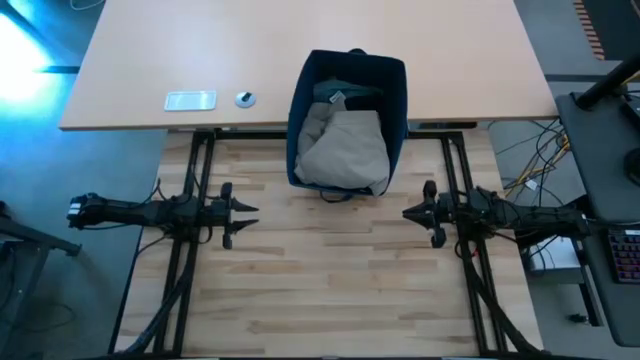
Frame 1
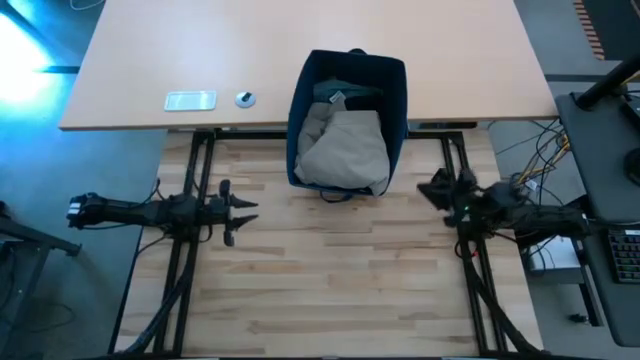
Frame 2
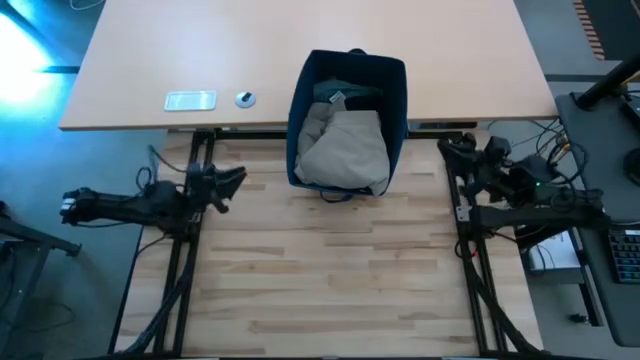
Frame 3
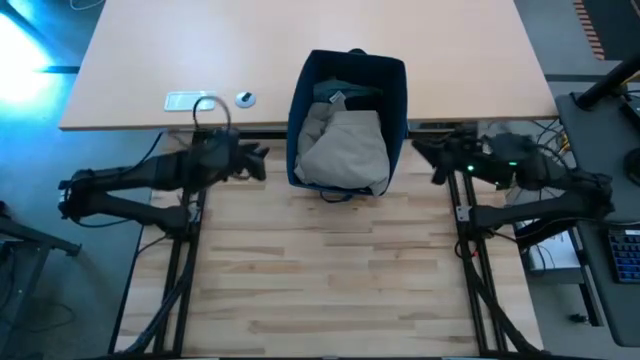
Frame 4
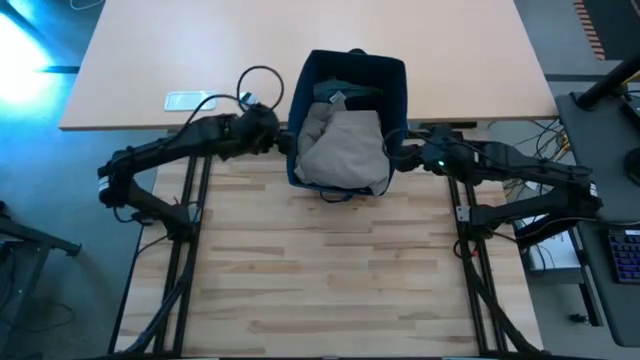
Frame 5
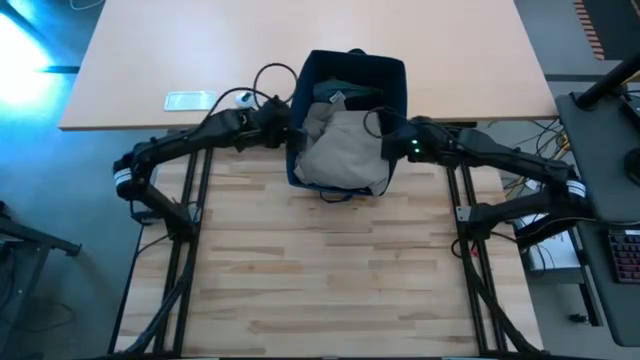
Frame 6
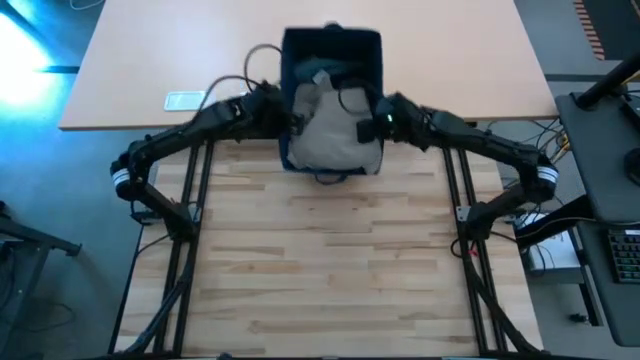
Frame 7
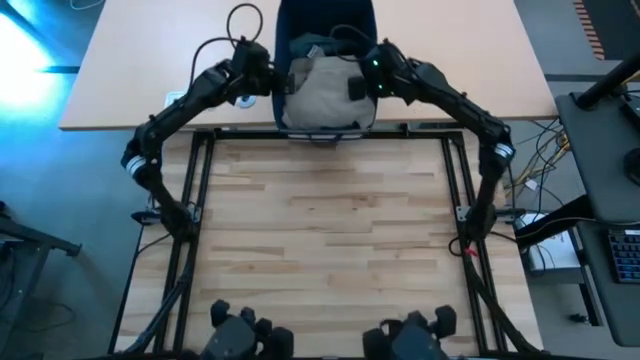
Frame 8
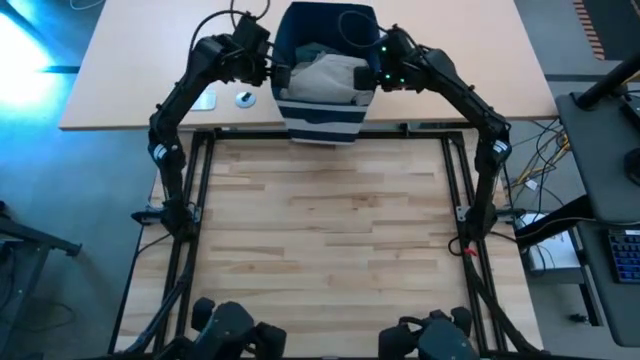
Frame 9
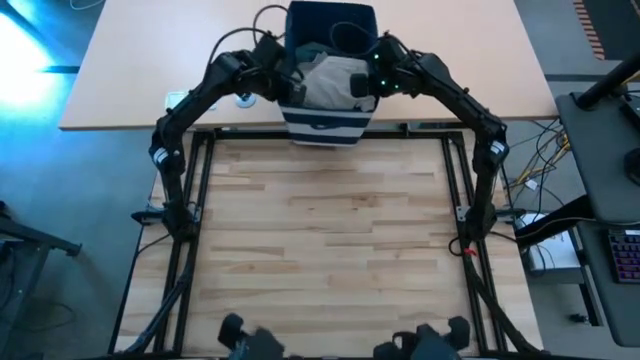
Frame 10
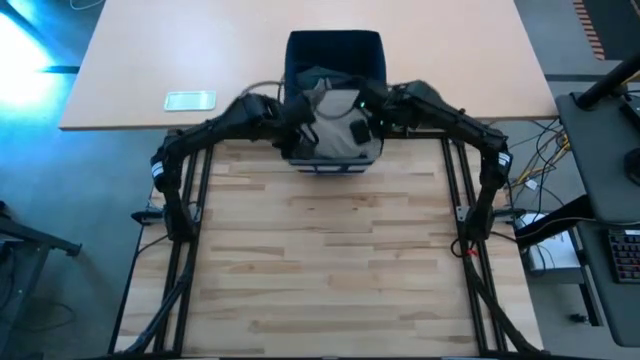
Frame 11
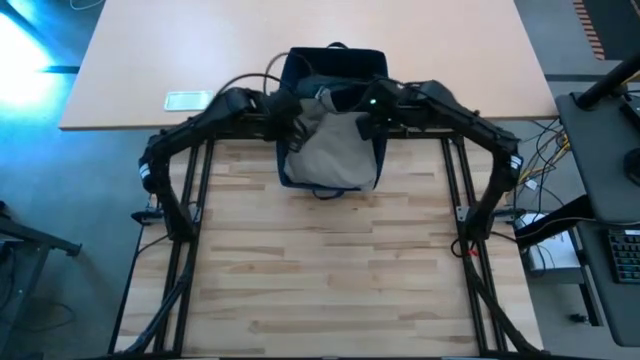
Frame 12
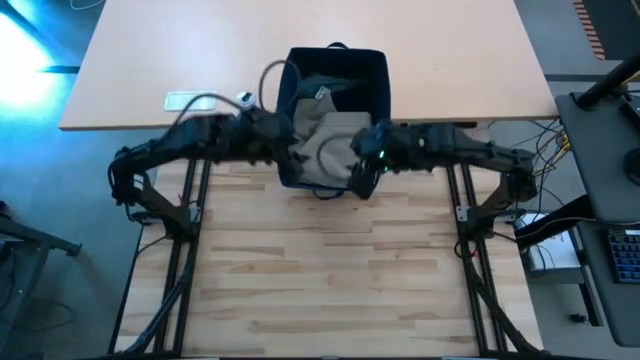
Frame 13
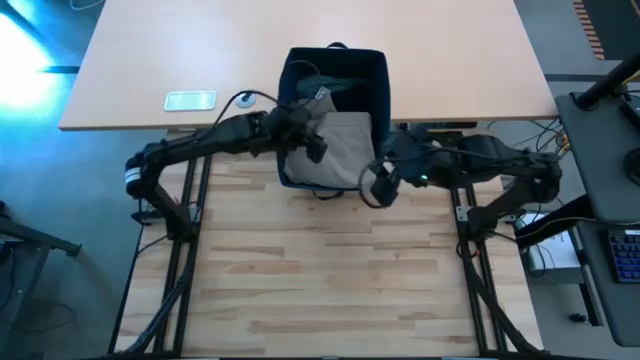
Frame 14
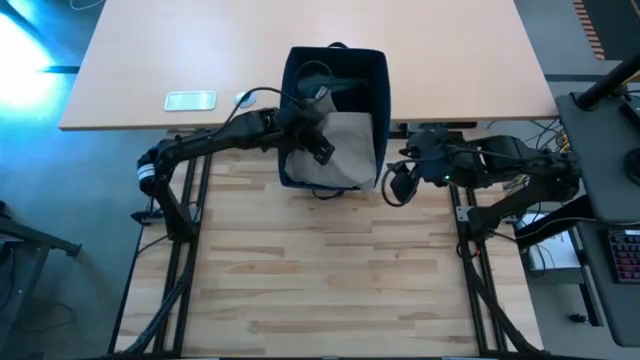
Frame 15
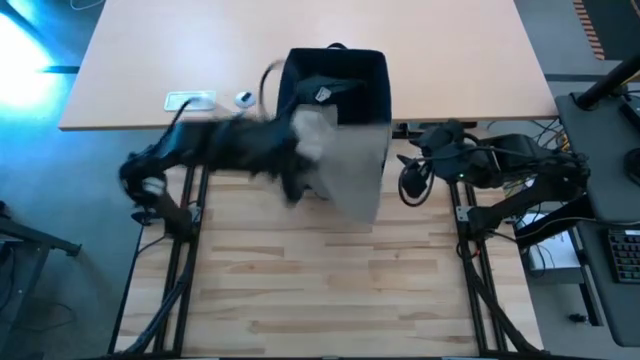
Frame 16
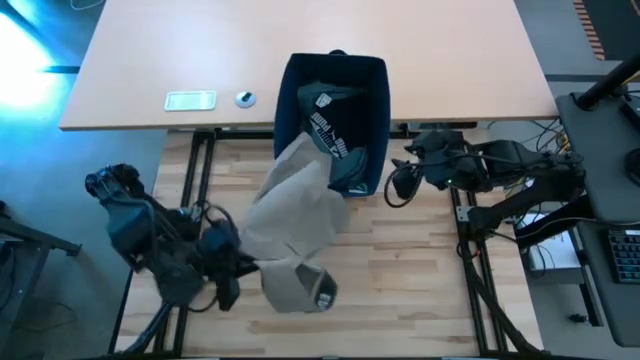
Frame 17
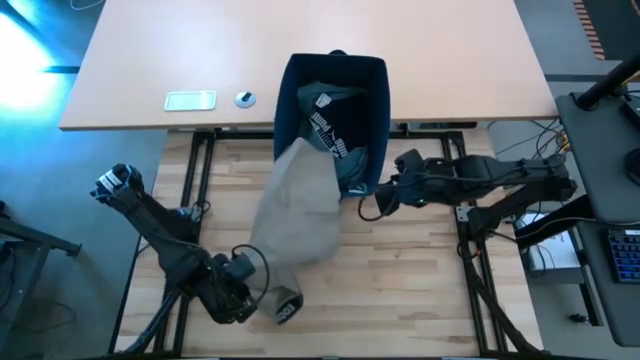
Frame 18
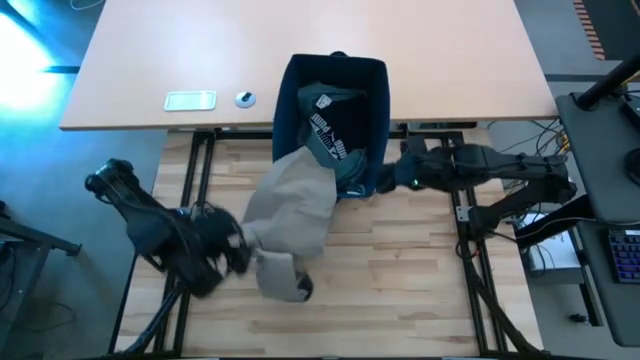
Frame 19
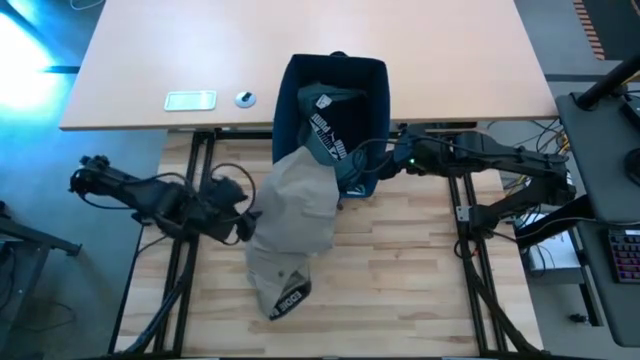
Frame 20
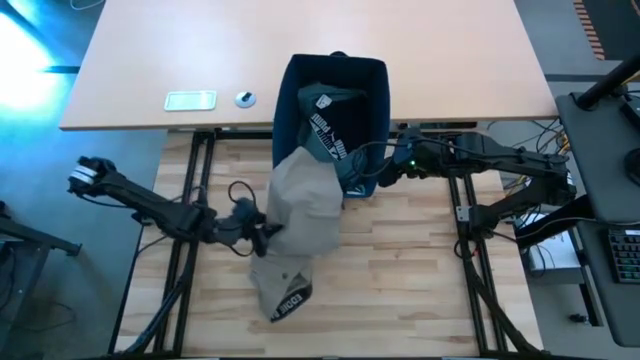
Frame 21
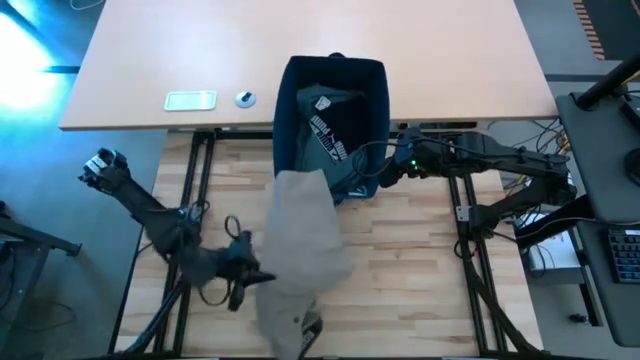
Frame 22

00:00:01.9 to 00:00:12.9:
Task: Fold Laundry from Bin
Remove the brown short from the laundry basket

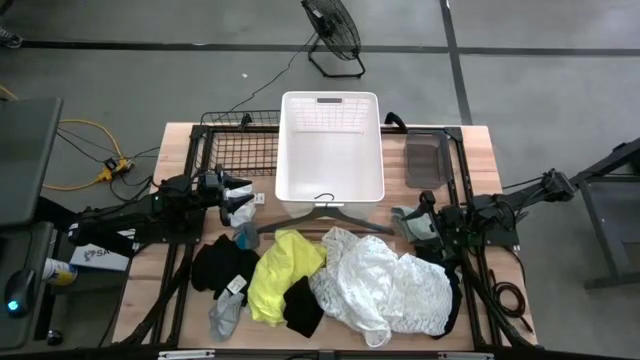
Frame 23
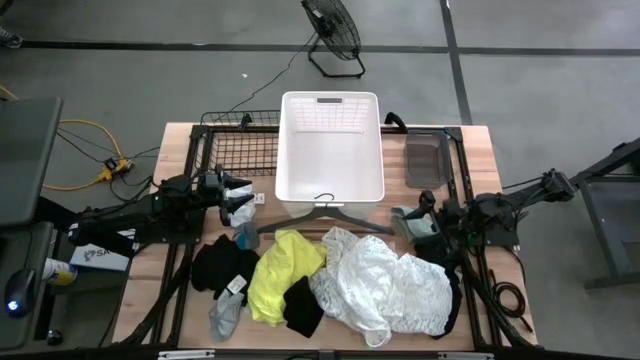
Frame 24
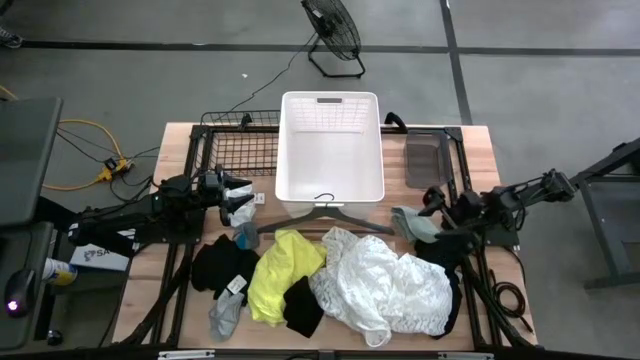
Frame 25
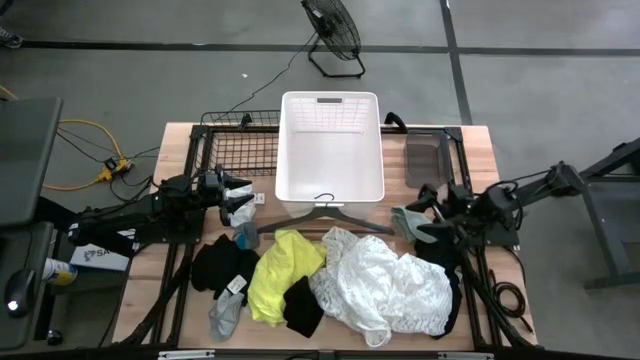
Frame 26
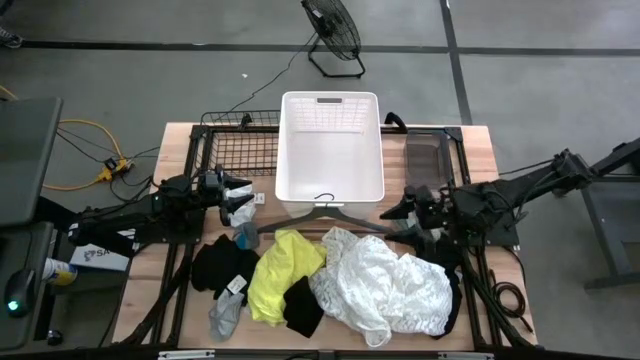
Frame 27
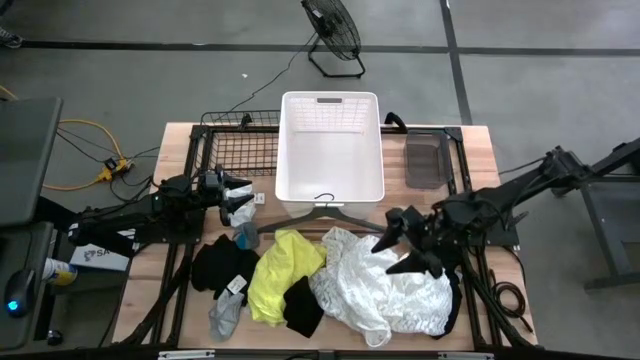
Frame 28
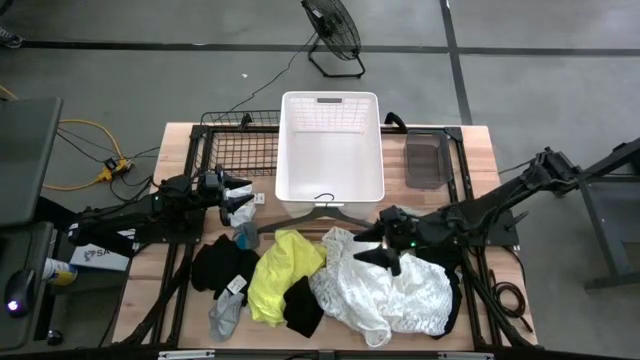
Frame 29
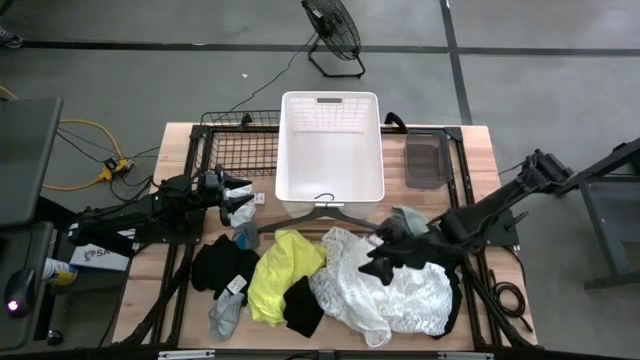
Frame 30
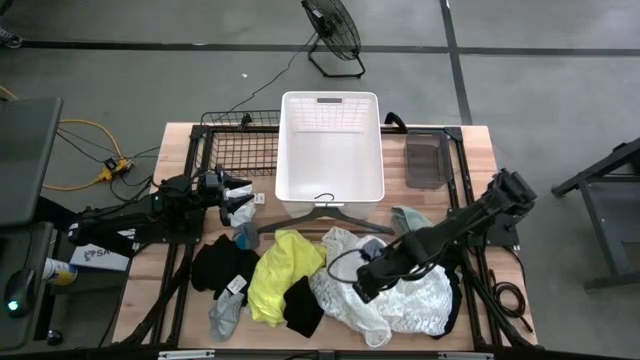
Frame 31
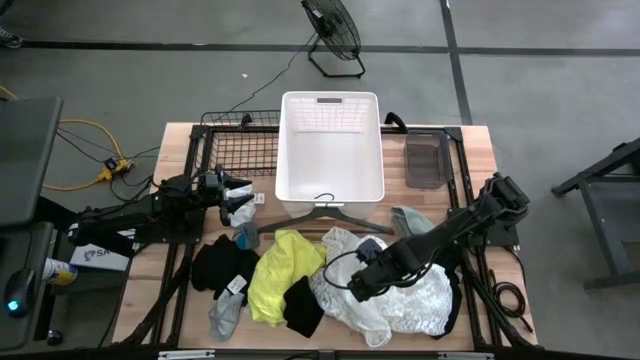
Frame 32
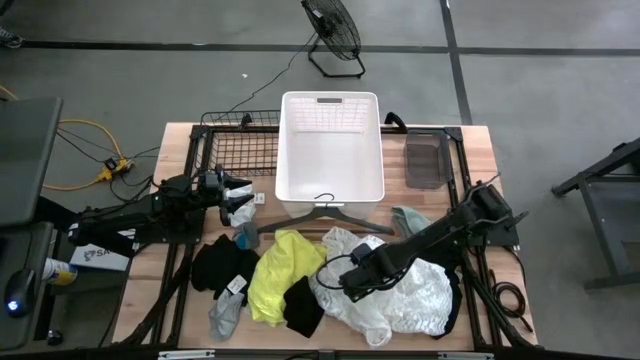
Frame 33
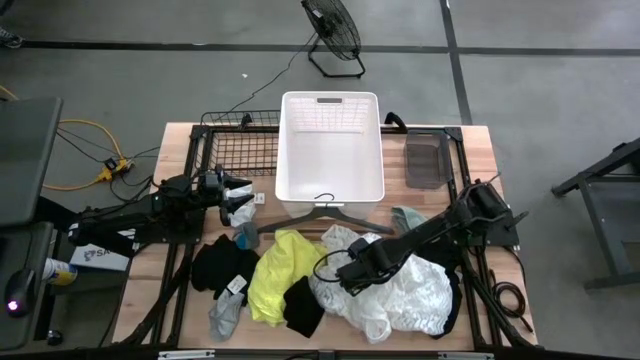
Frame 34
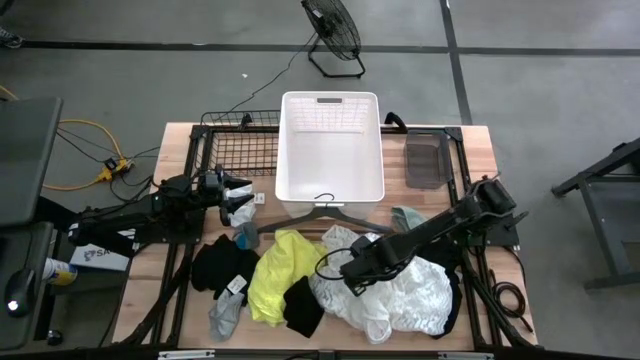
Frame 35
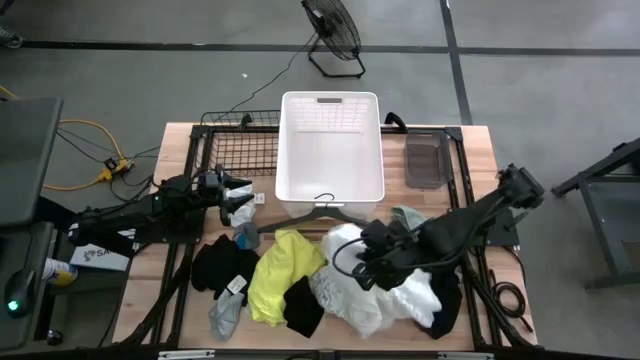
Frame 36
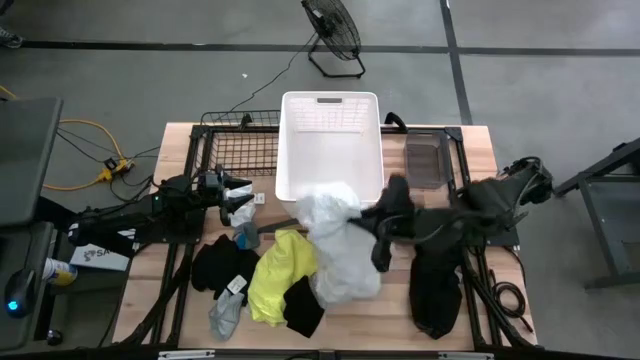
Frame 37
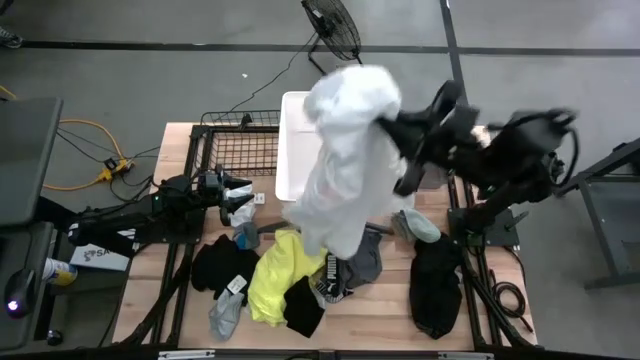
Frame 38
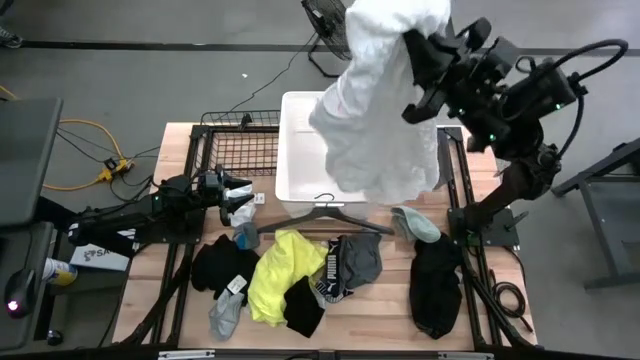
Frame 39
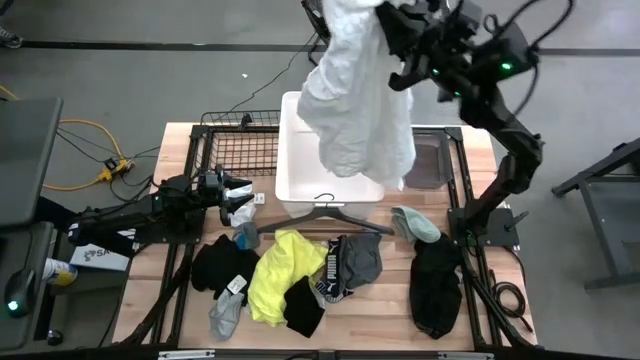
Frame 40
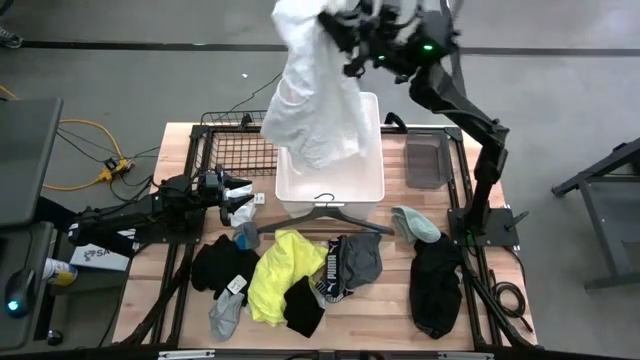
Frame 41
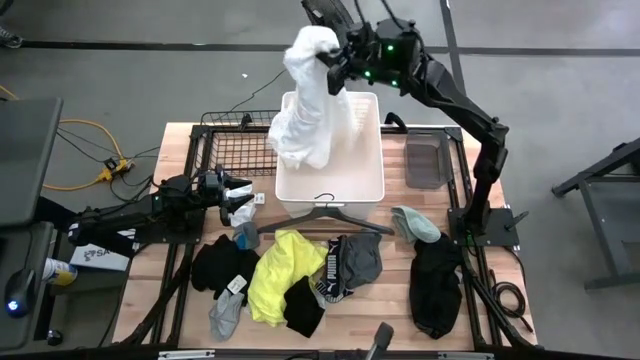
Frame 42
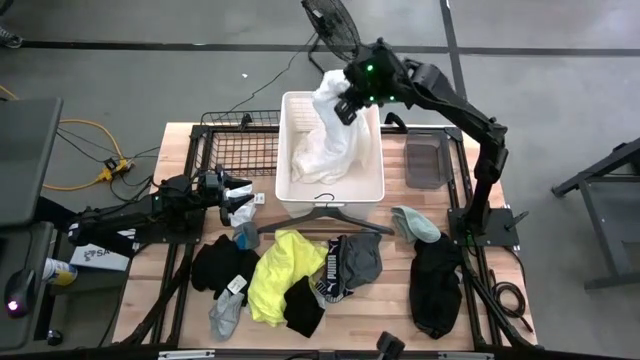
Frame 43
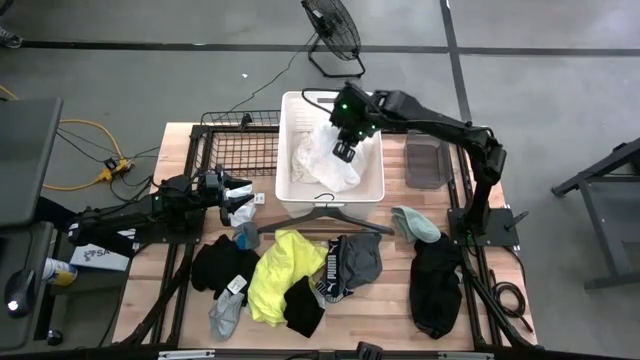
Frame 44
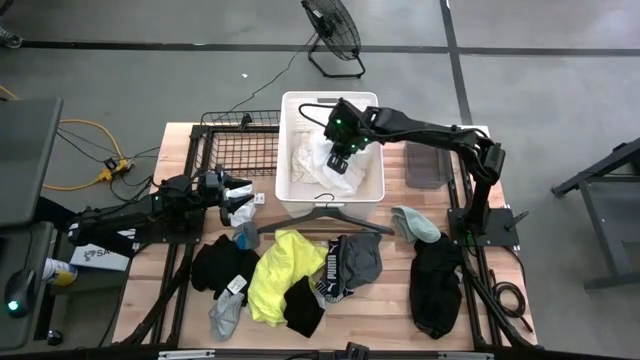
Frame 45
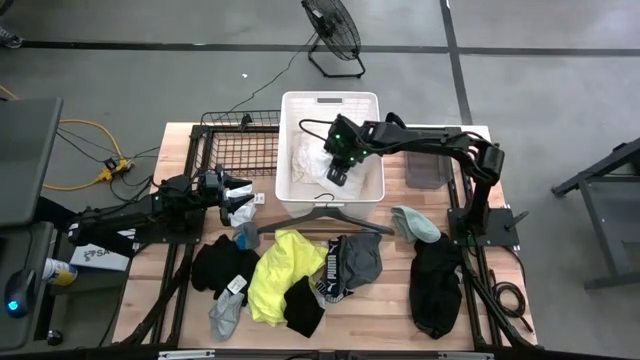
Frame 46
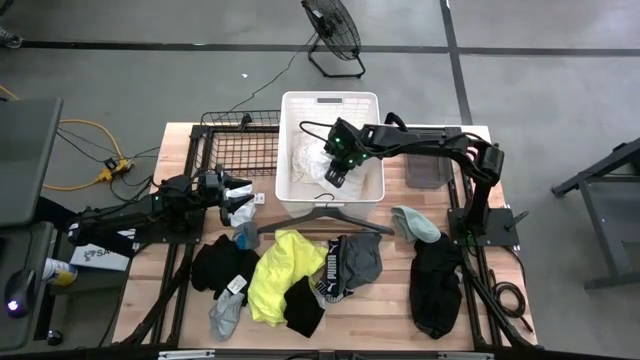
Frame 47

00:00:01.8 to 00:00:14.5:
Task: Pick & Place Cloths
Put the white dress into the white bin
